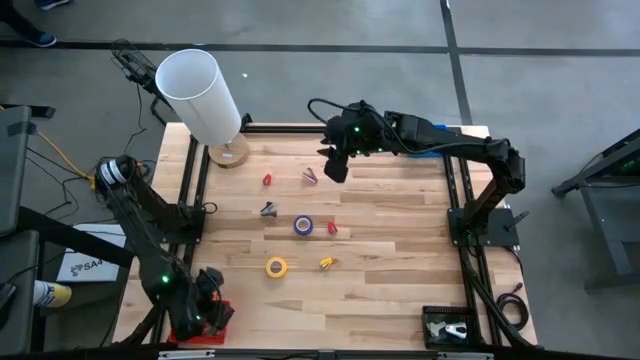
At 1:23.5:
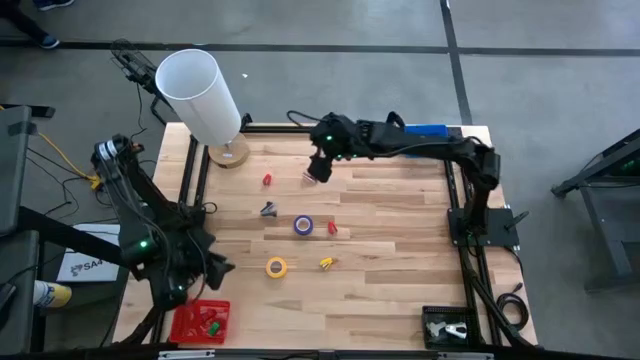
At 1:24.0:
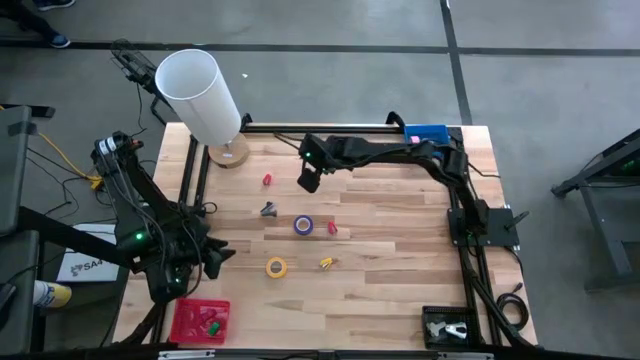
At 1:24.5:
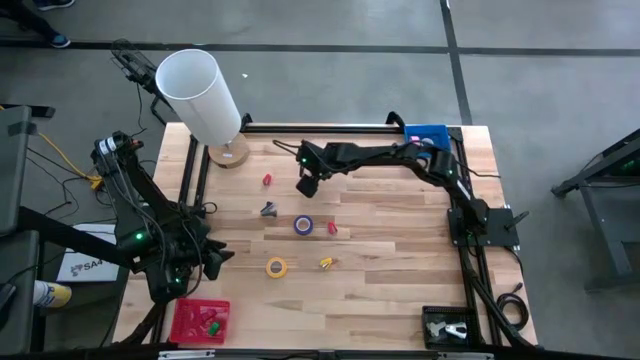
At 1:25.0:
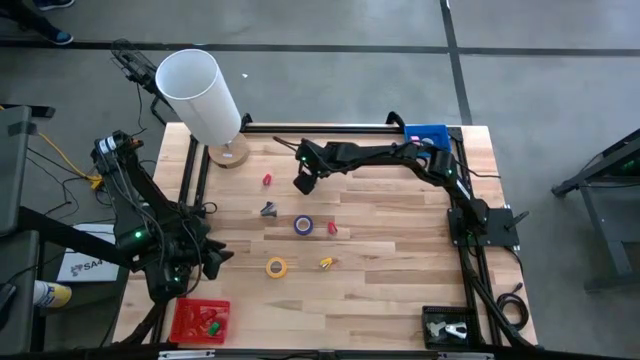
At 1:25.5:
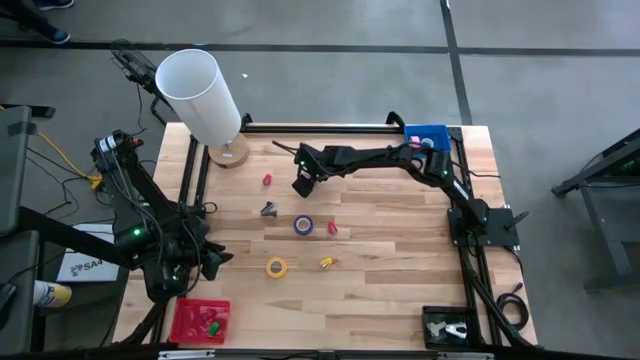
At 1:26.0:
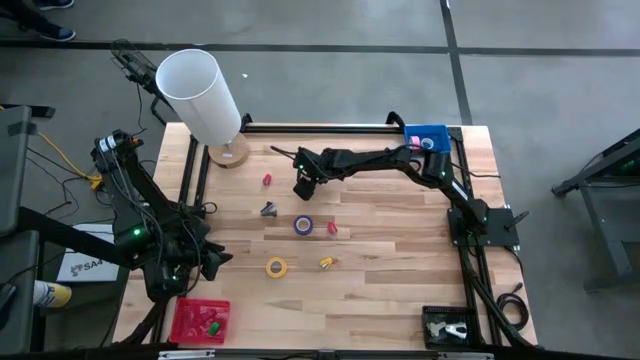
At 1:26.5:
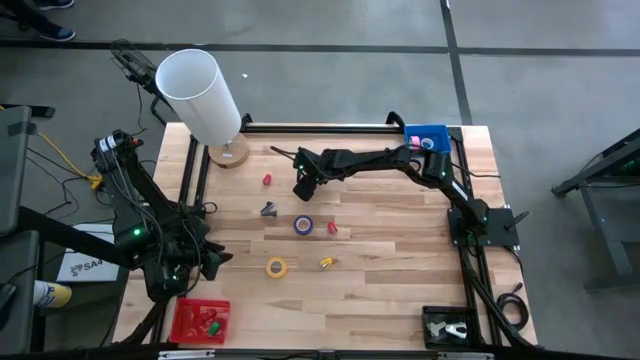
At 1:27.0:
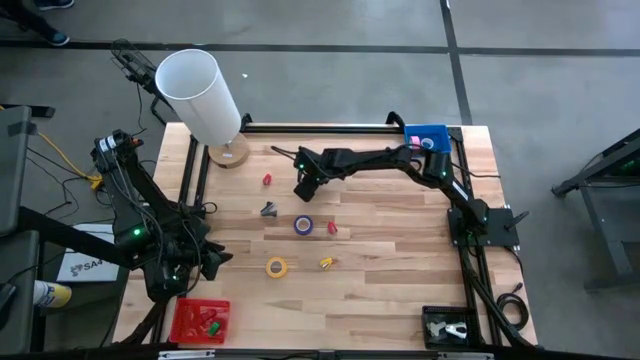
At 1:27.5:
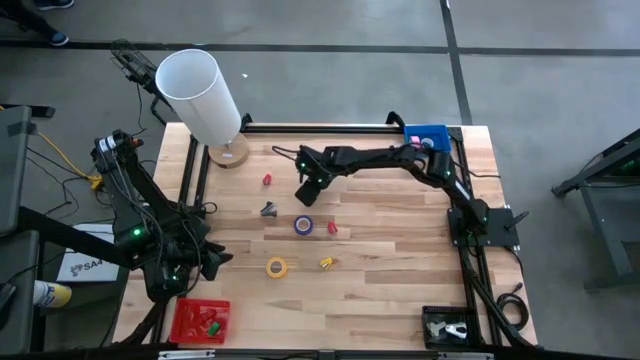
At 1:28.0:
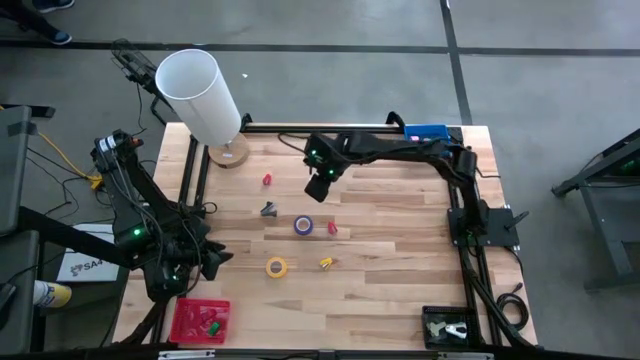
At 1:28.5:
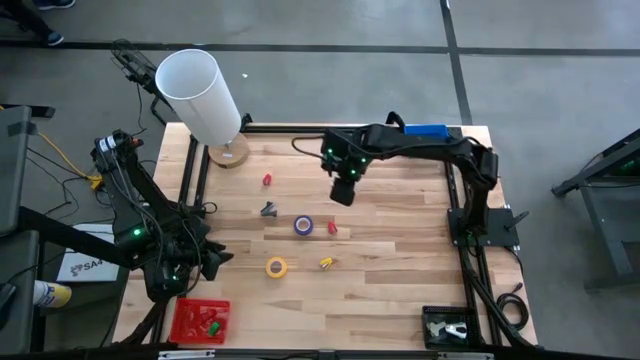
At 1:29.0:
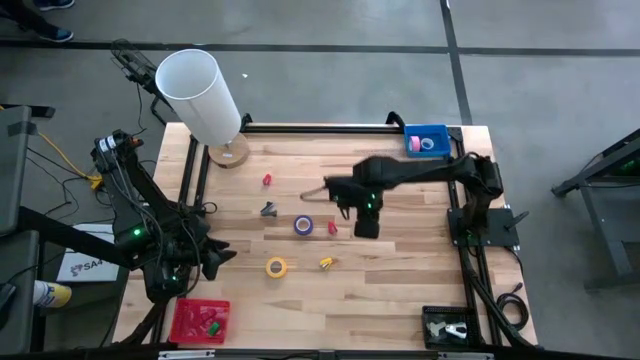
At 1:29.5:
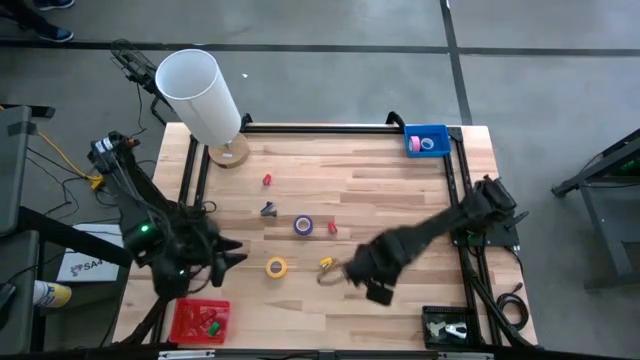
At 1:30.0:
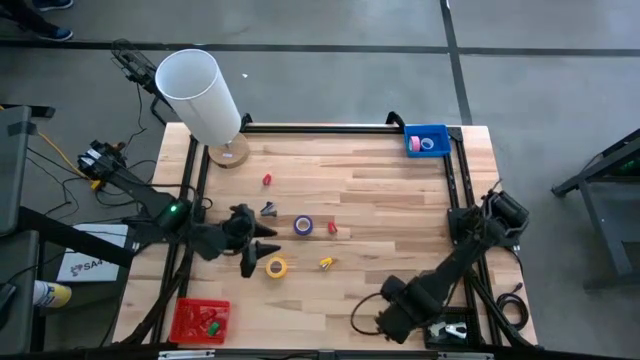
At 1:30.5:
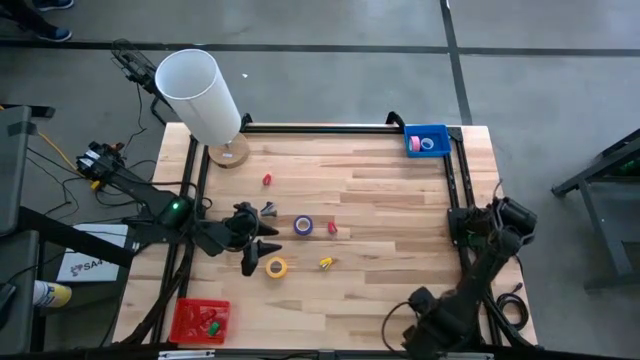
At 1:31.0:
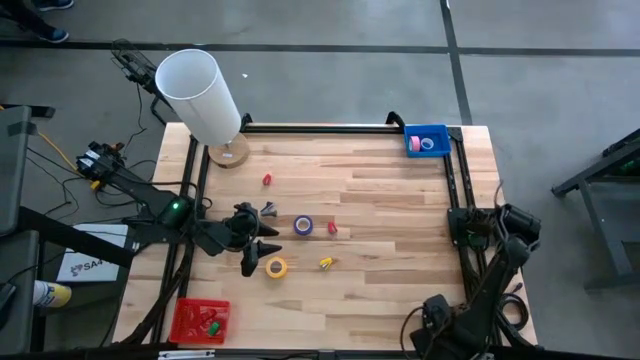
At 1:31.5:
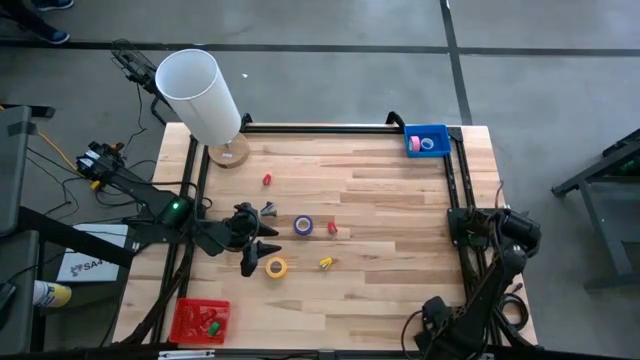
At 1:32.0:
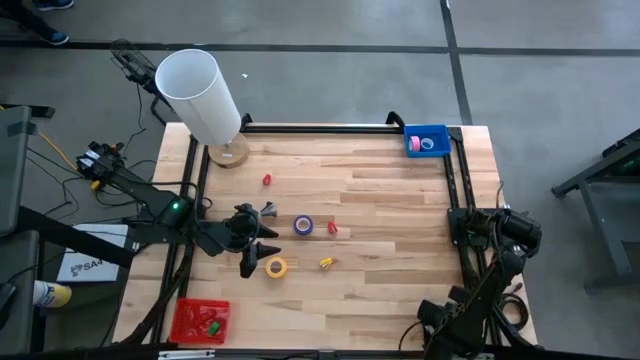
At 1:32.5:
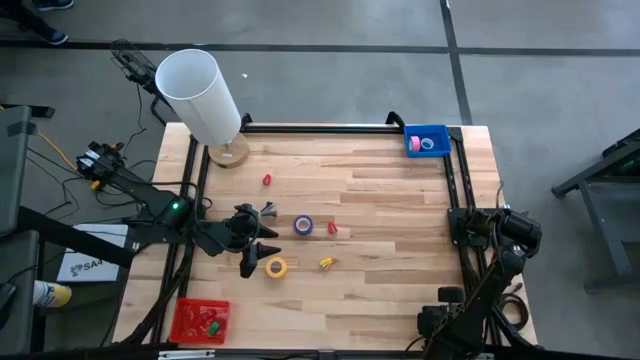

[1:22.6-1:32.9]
Task: Pick and place Stapler, Stapler remover, tape
Put the pink staple remover into the black bin

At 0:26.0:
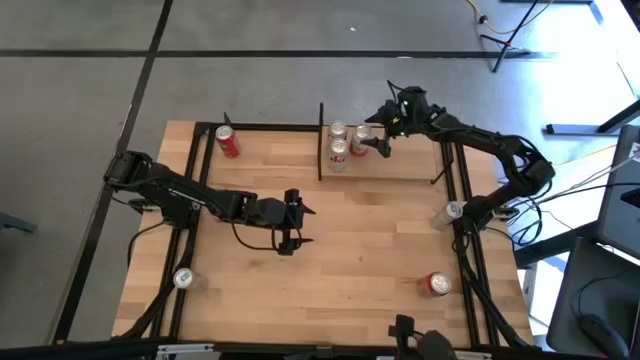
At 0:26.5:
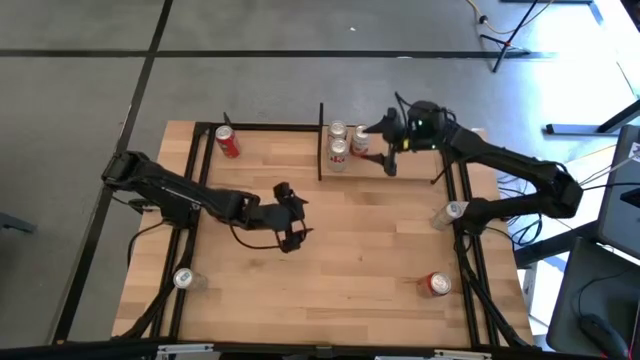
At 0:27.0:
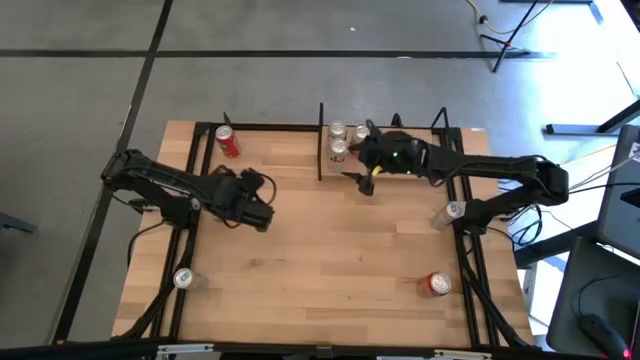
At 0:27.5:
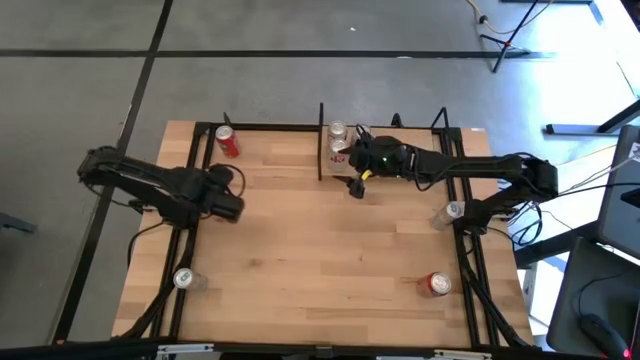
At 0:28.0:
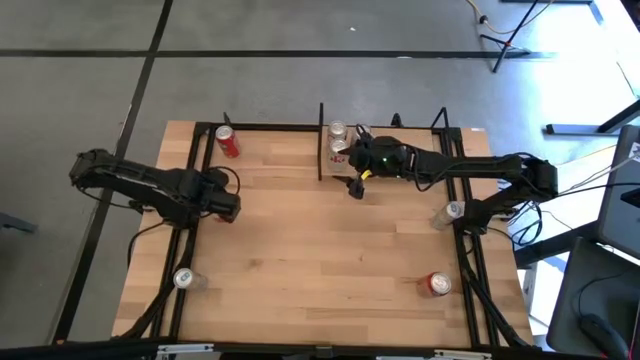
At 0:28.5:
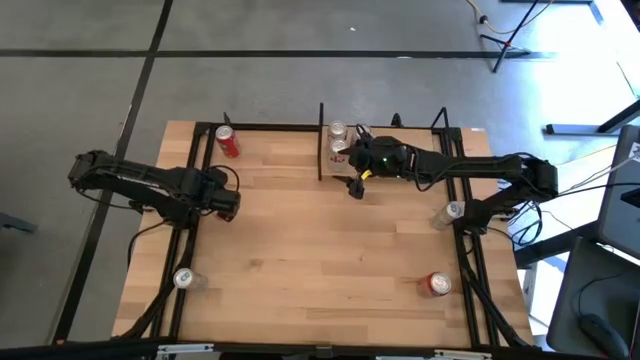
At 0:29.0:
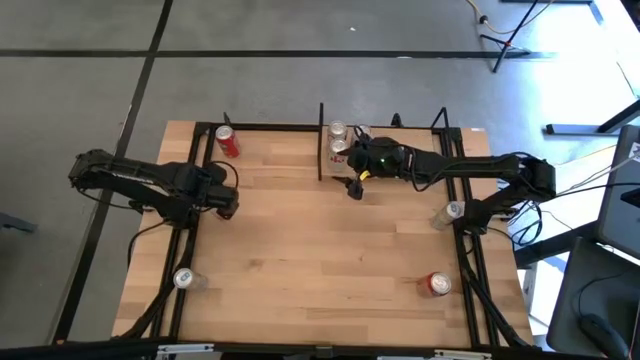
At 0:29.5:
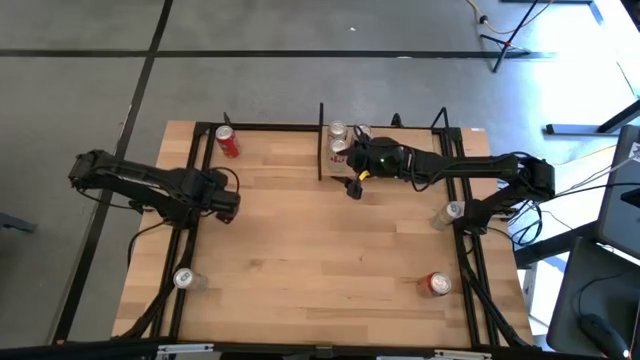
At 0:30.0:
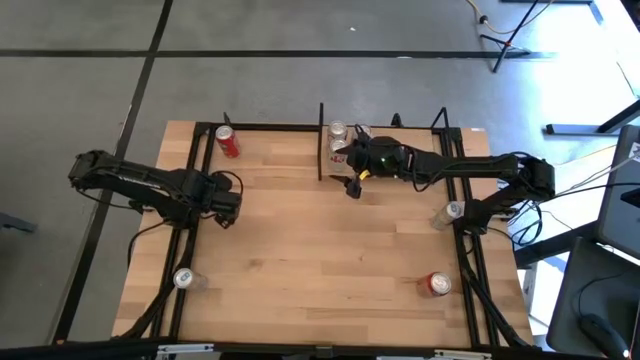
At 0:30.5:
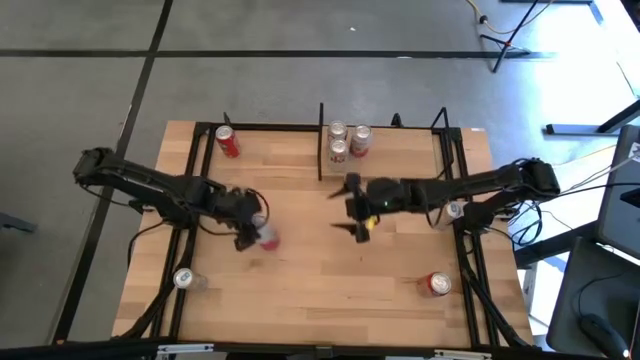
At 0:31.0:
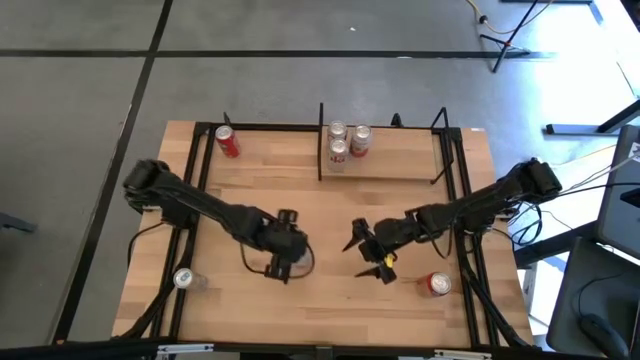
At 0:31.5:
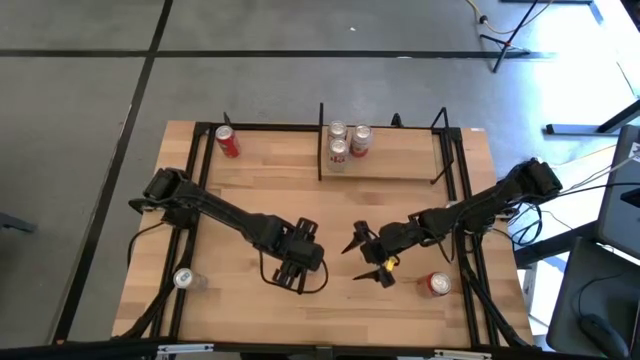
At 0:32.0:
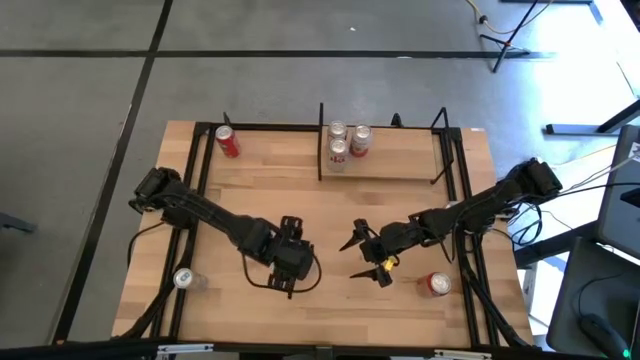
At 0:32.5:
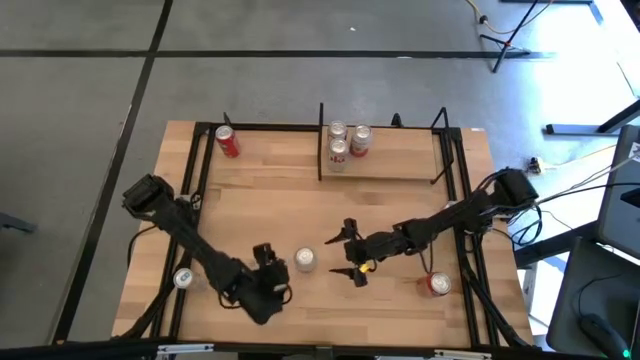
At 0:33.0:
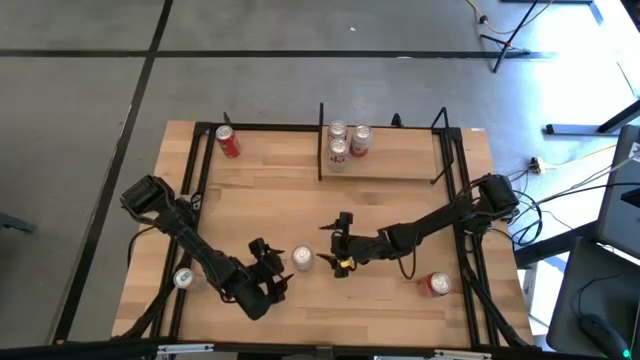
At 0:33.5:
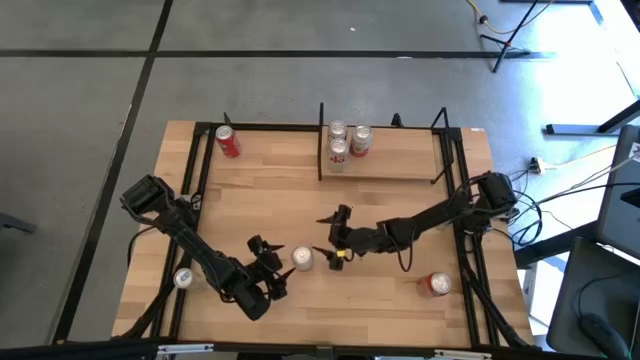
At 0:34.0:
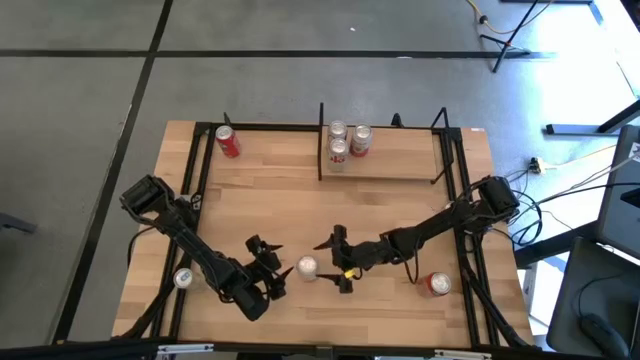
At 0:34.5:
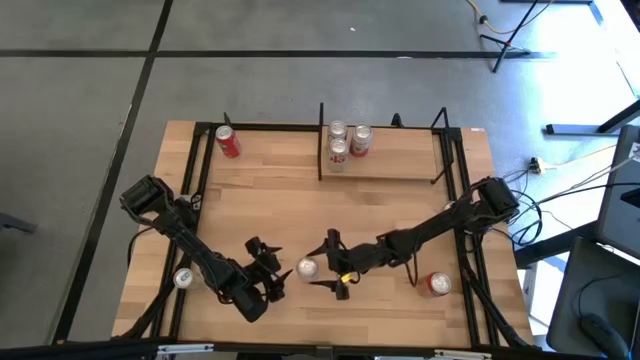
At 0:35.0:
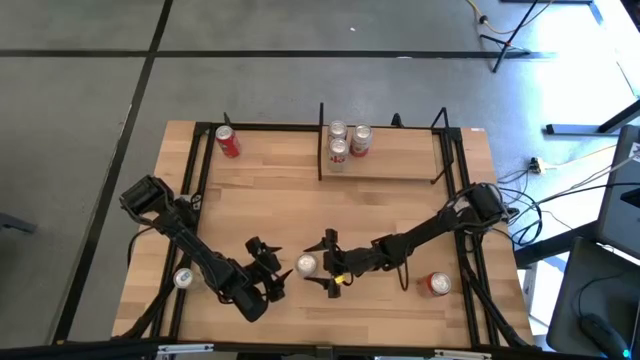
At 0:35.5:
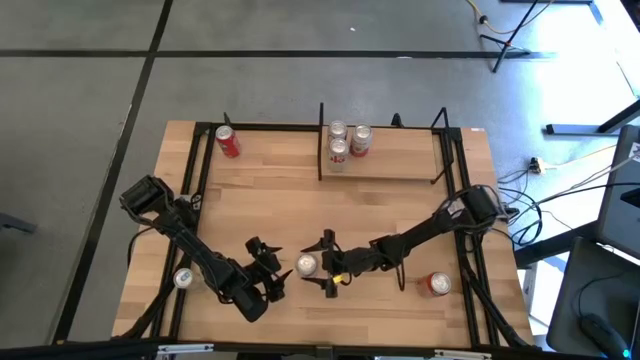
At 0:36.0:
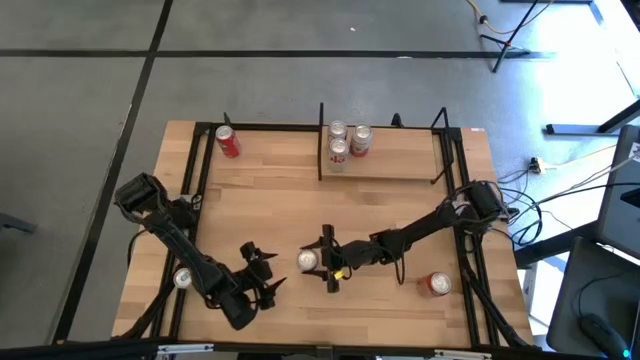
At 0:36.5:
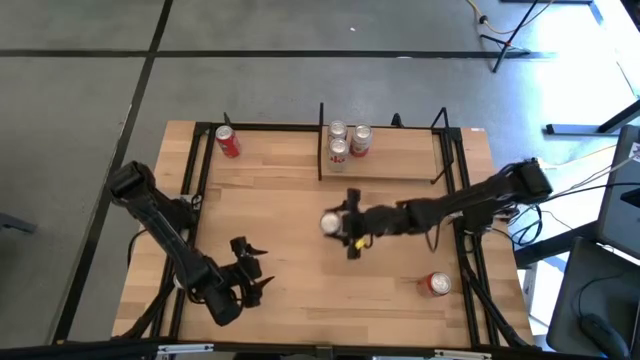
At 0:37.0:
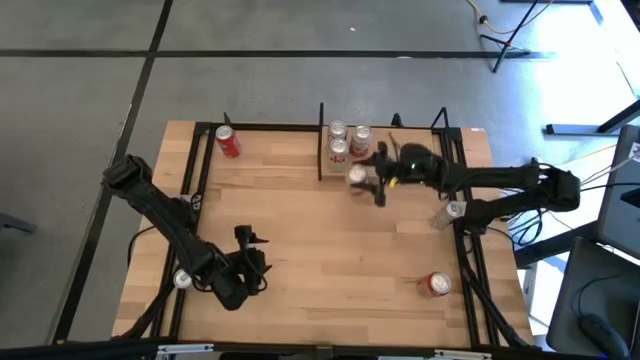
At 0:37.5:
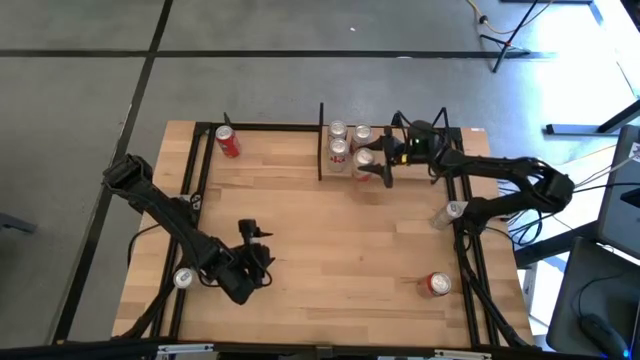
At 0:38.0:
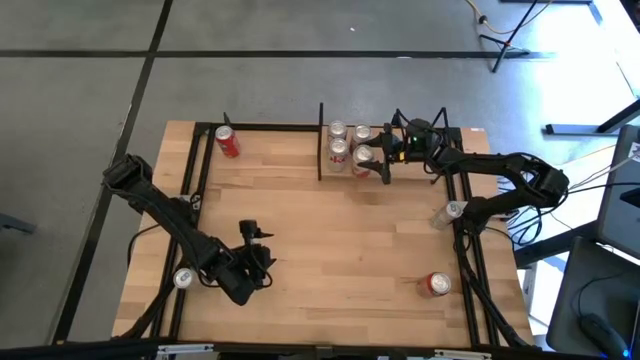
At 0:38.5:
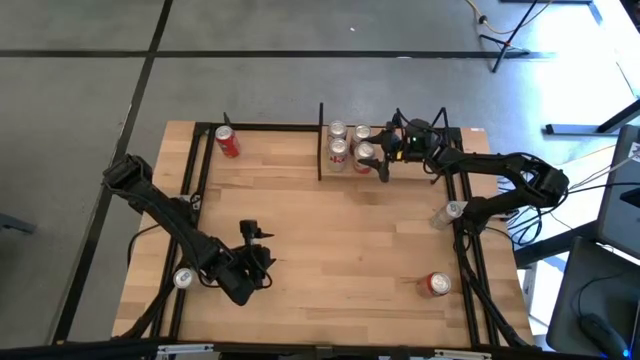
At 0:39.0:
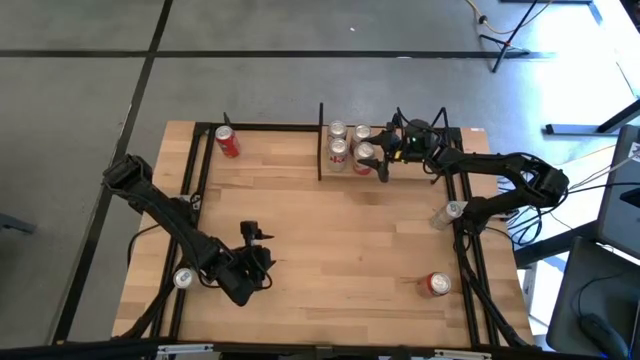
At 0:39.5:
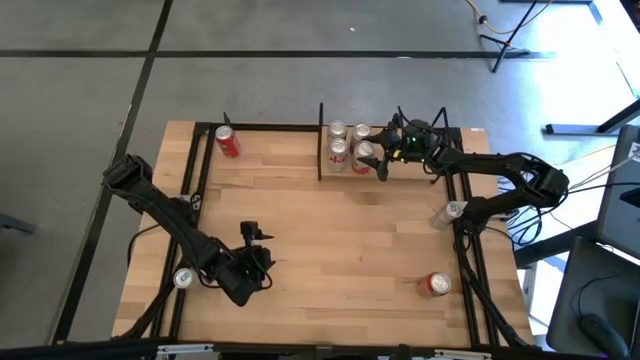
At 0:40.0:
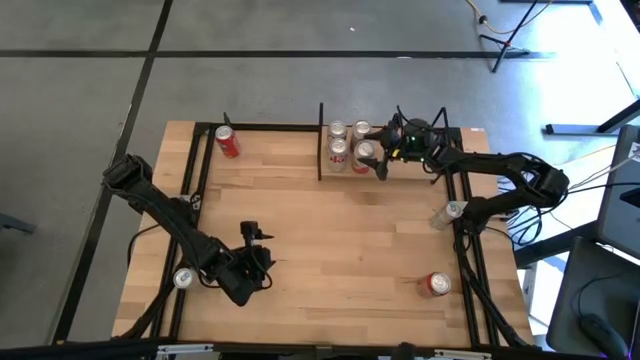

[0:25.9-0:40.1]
Task: Place canned beverage on shelf
Put the pink white soda can on the shelf aligned with the other pink white soda can
